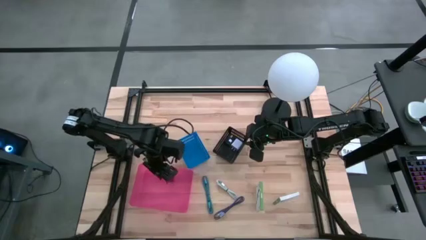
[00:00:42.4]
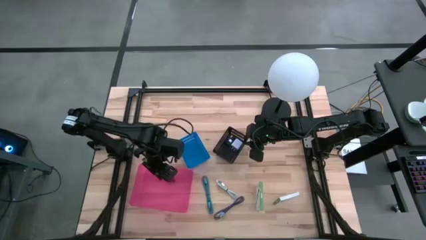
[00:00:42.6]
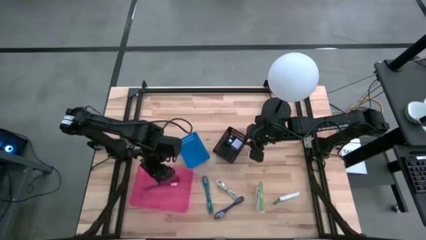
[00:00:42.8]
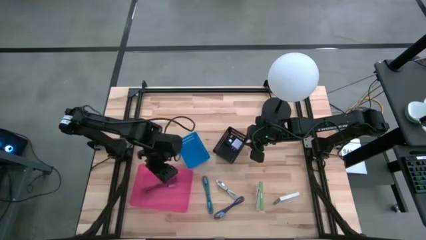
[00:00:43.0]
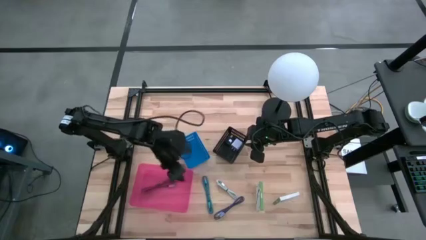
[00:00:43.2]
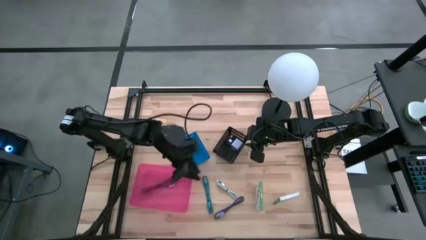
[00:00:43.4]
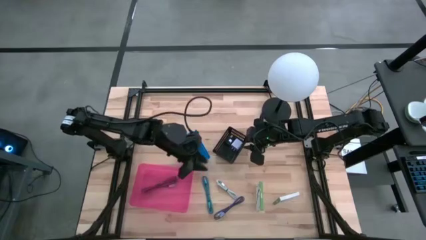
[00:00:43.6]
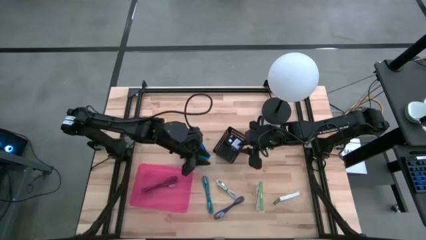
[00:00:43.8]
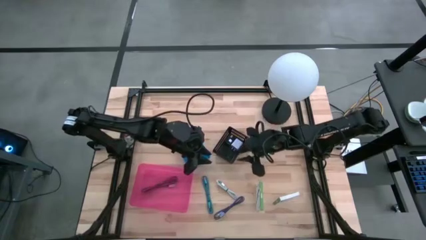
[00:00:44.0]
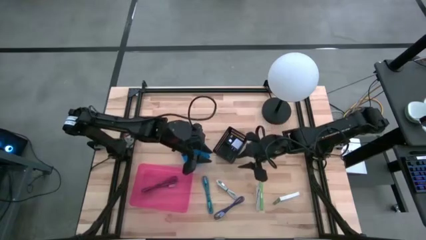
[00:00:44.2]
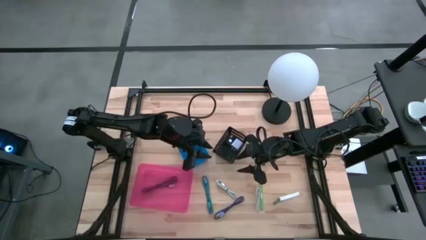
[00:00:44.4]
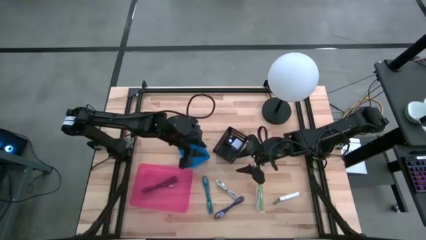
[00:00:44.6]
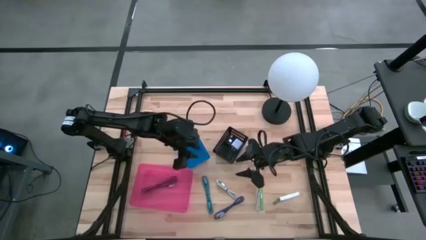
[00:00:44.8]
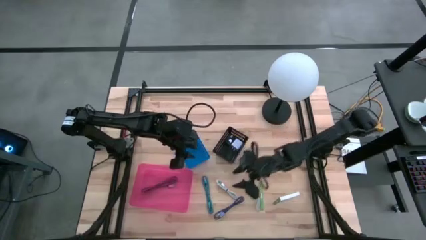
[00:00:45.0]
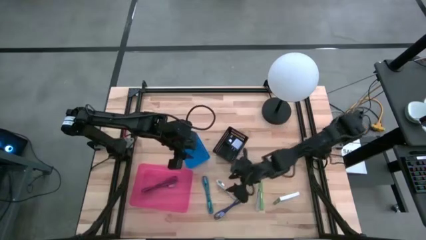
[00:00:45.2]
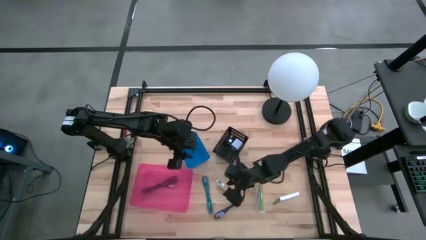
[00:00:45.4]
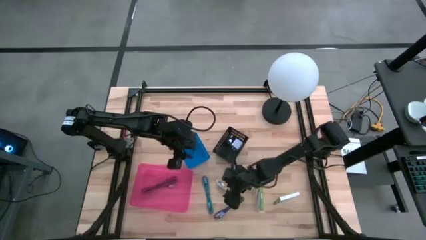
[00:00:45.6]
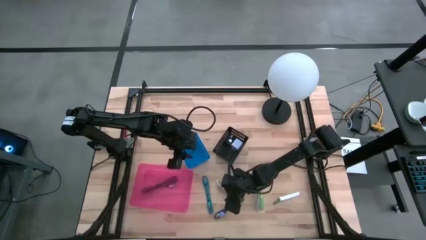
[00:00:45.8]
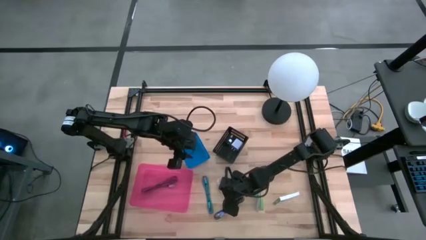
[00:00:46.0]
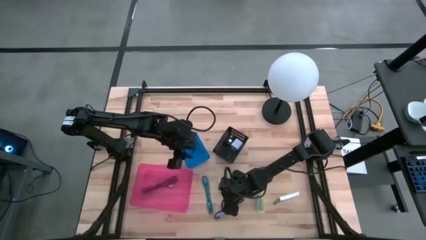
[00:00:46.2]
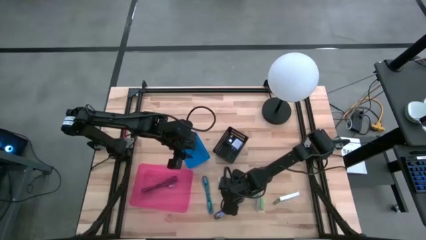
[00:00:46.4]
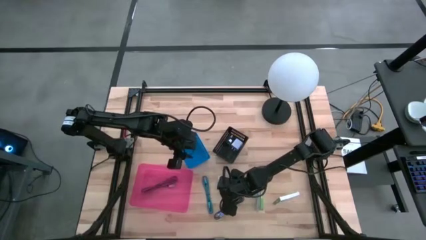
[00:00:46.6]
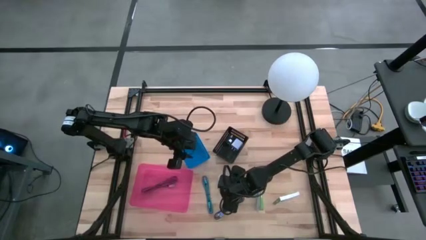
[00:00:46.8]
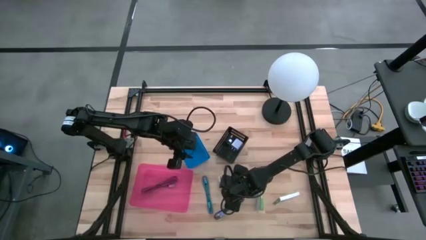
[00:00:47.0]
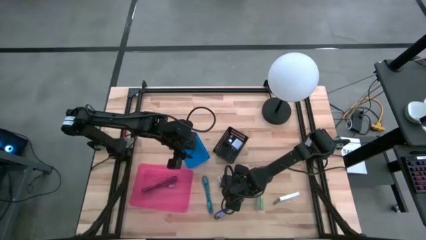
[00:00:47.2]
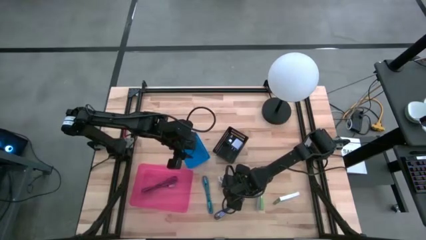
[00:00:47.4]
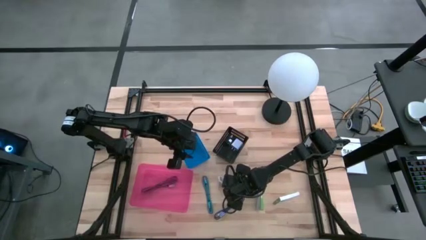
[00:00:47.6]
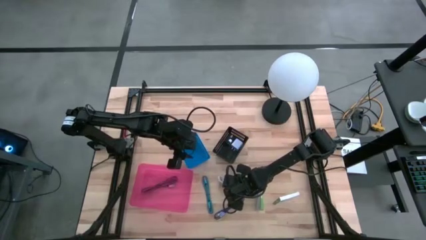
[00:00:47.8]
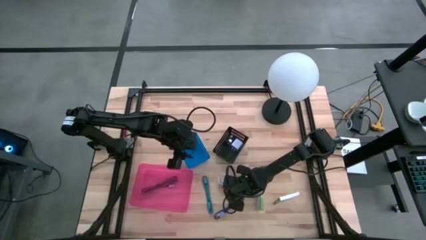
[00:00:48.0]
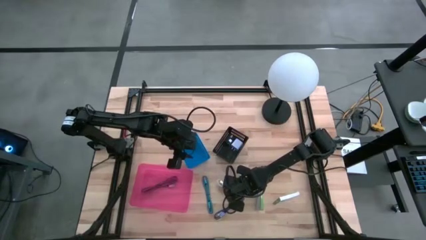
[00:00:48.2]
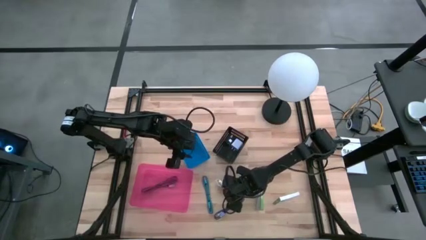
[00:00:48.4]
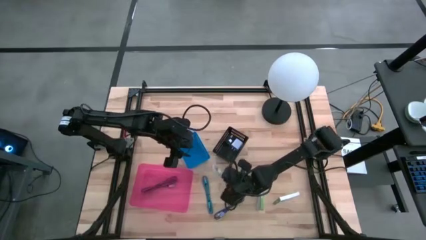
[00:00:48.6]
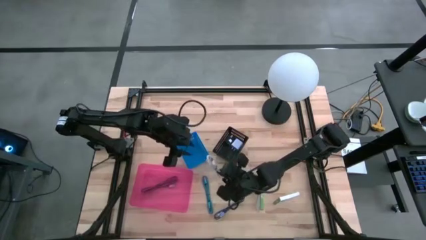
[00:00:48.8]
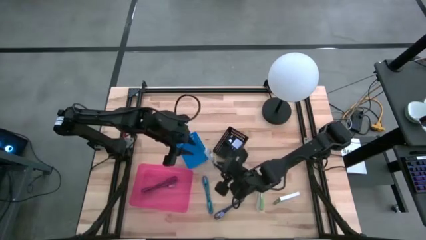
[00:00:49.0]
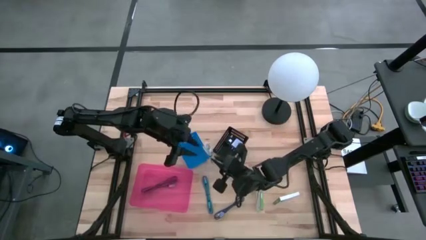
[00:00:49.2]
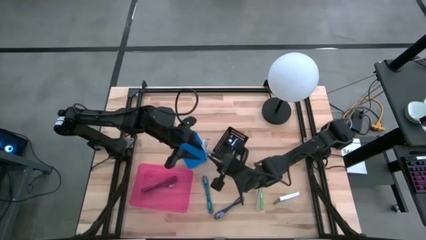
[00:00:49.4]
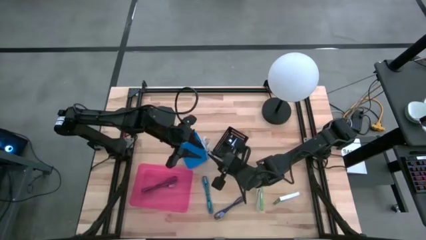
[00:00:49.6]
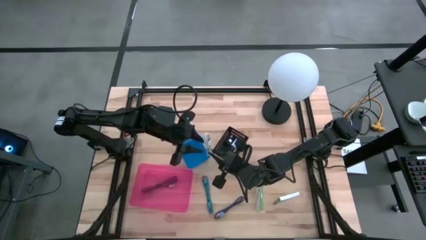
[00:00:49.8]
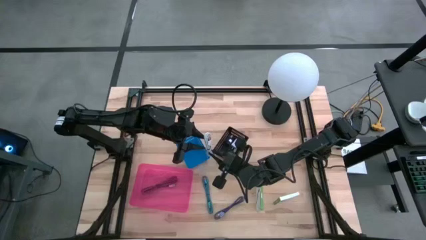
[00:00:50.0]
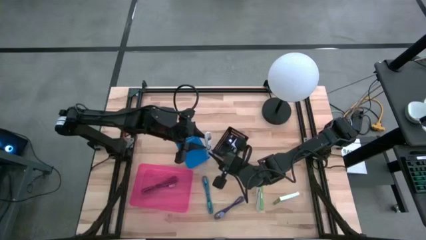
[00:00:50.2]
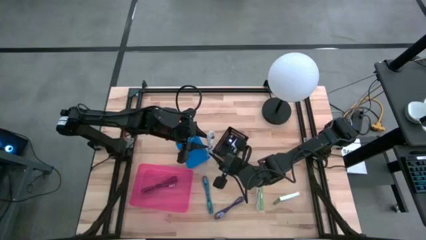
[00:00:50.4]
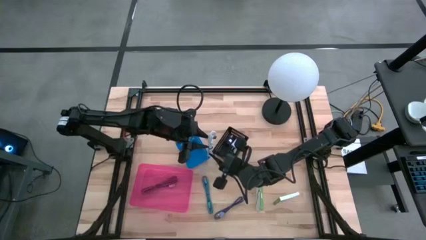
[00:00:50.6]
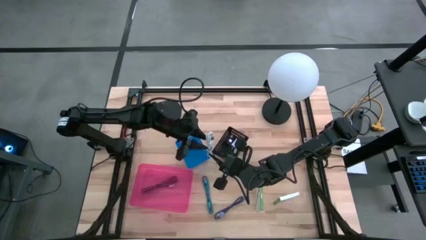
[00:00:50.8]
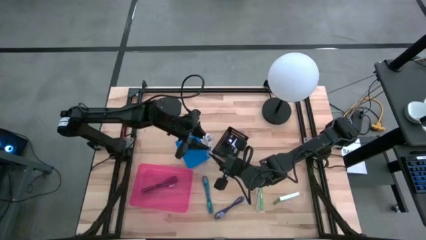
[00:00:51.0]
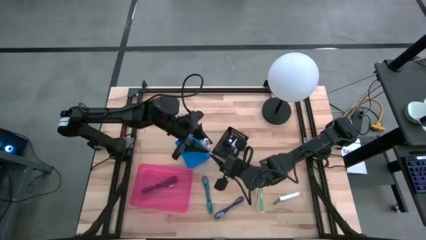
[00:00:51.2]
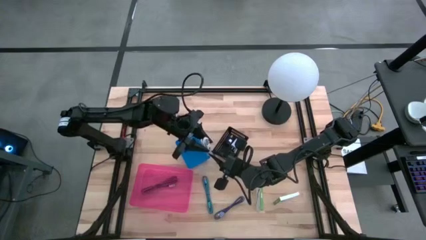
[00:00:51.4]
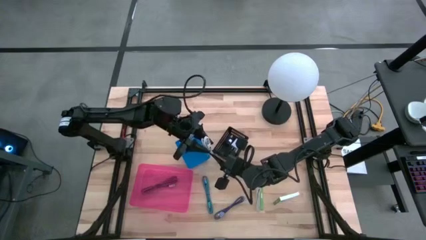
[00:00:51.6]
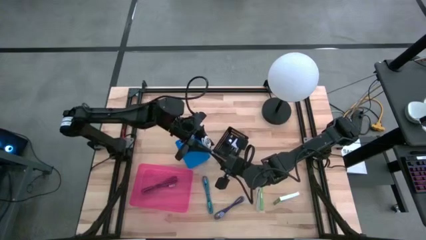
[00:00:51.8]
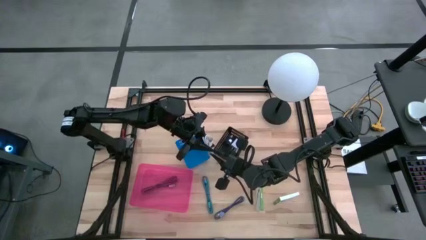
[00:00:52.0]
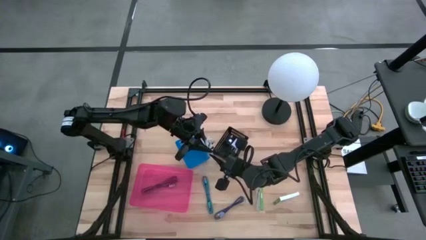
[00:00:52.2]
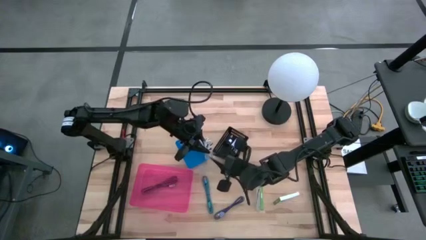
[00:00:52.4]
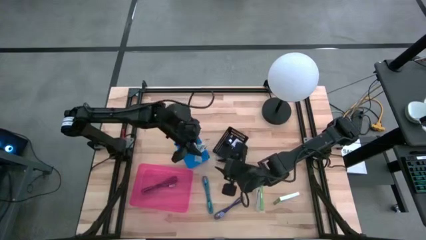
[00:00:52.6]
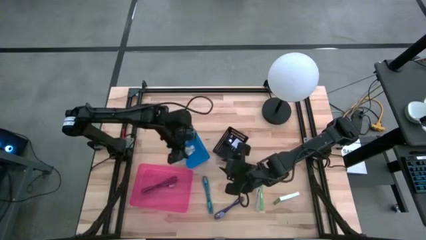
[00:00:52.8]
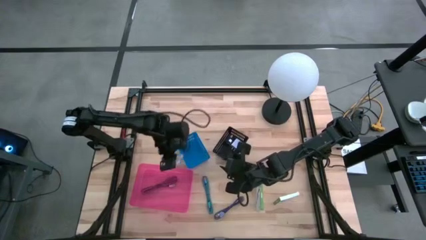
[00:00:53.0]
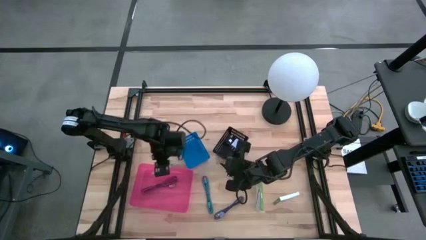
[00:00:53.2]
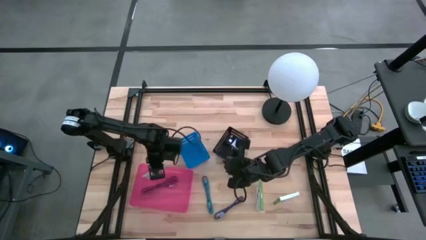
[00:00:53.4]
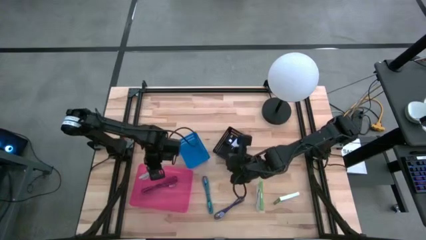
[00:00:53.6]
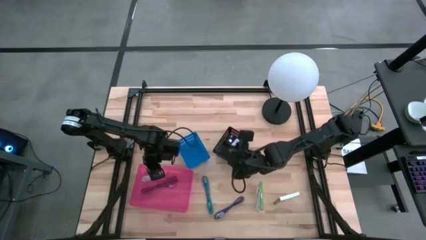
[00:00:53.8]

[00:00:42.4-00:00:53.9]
Task: Pick and place items into bin
Put the white charger cable into the pink bin
